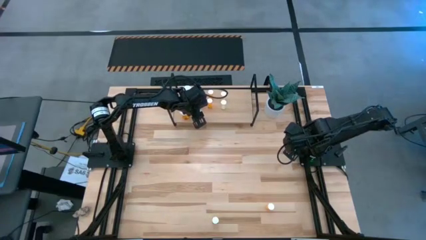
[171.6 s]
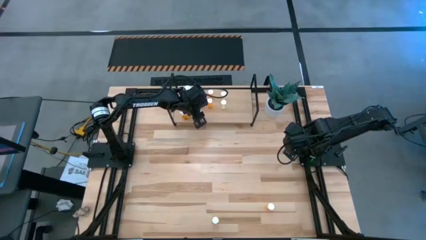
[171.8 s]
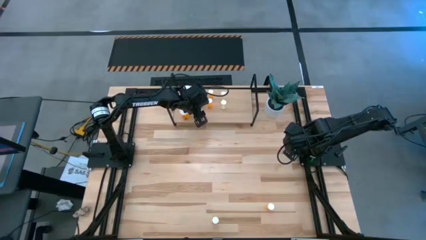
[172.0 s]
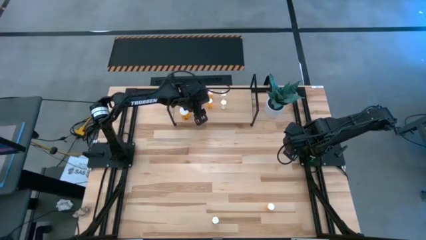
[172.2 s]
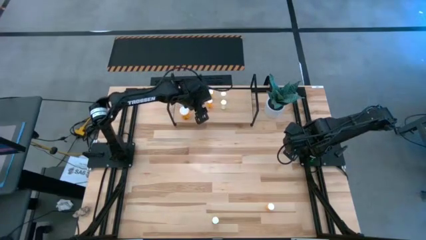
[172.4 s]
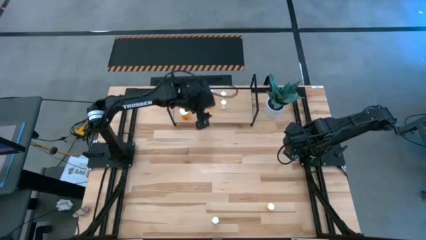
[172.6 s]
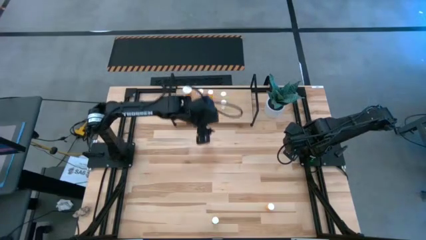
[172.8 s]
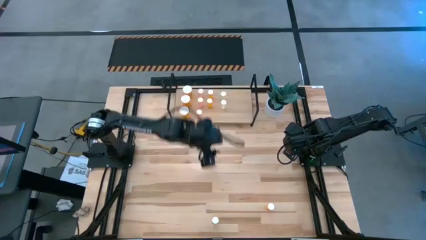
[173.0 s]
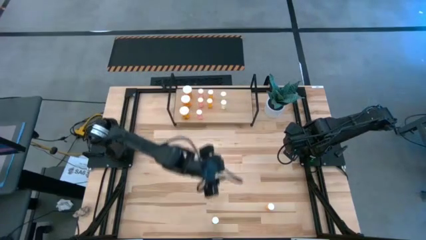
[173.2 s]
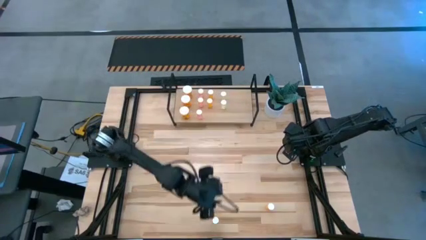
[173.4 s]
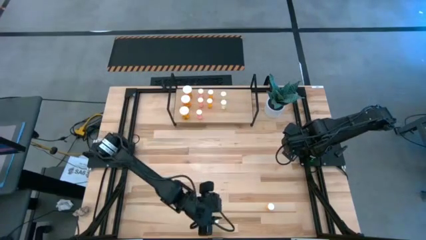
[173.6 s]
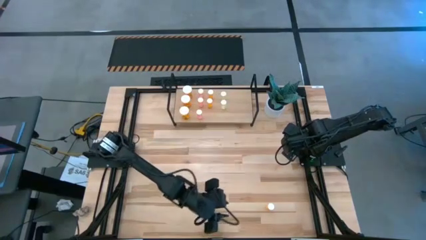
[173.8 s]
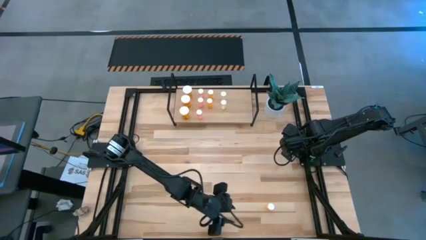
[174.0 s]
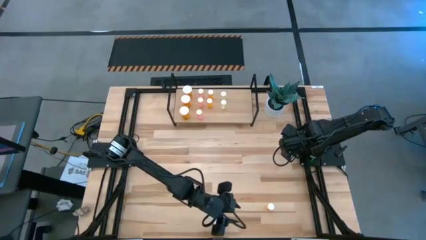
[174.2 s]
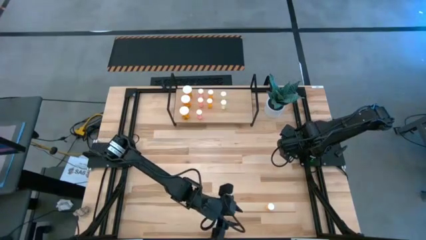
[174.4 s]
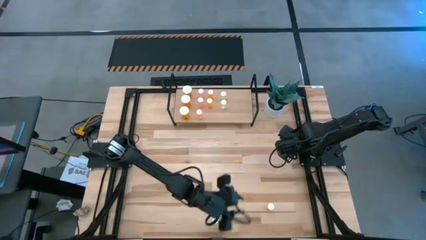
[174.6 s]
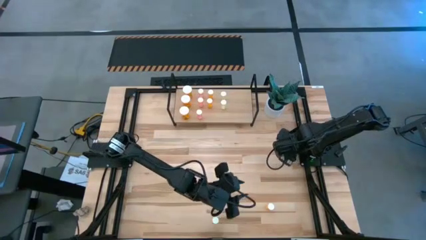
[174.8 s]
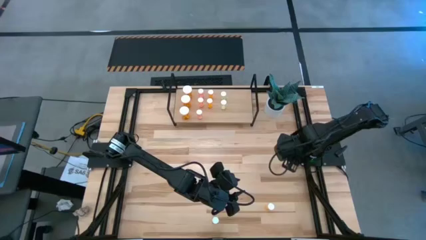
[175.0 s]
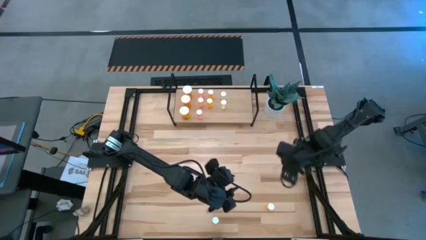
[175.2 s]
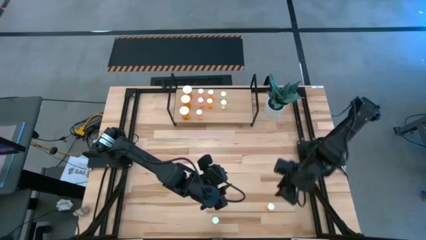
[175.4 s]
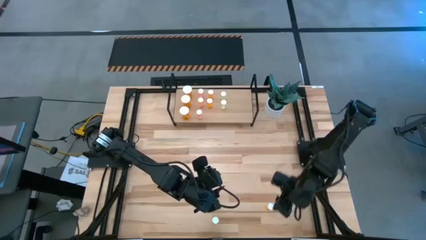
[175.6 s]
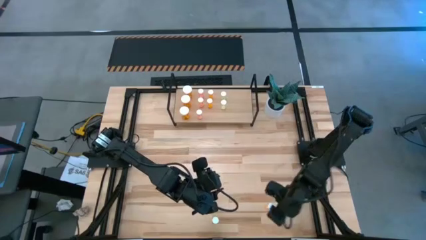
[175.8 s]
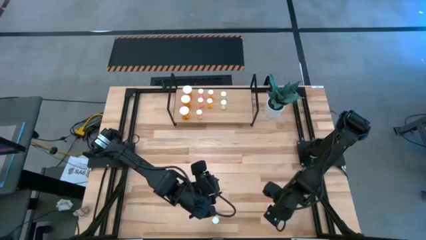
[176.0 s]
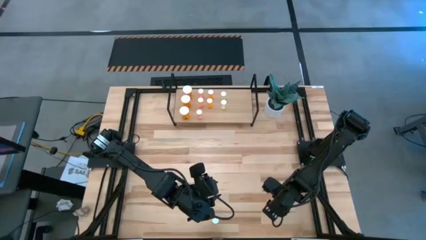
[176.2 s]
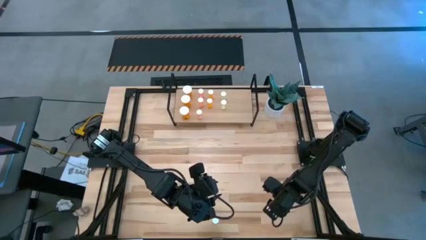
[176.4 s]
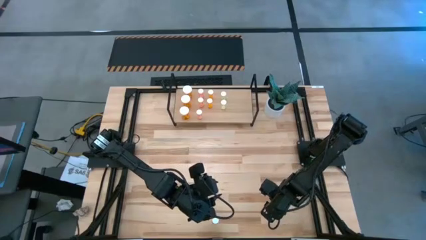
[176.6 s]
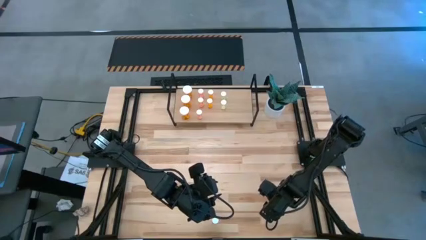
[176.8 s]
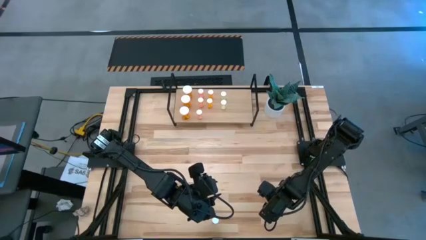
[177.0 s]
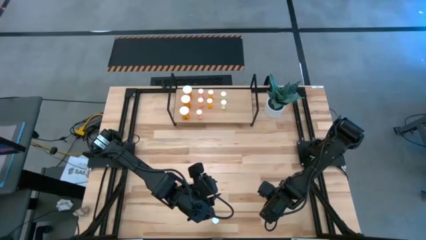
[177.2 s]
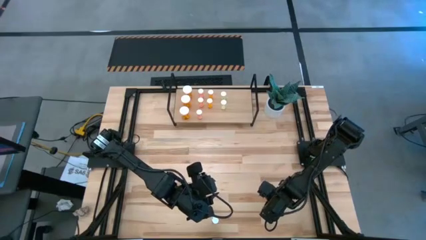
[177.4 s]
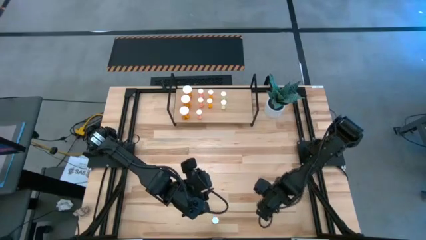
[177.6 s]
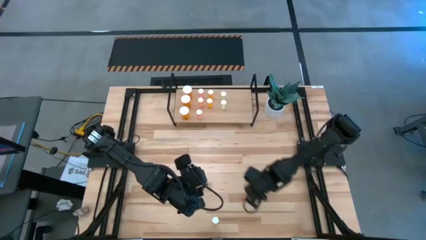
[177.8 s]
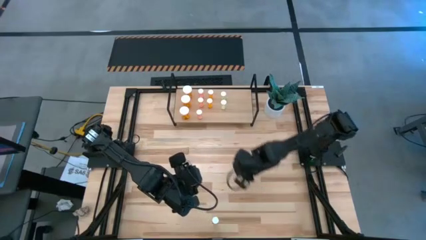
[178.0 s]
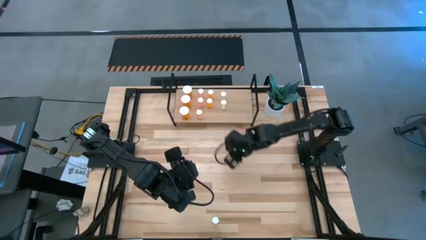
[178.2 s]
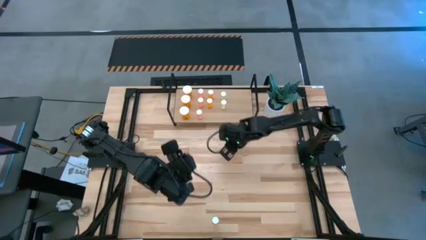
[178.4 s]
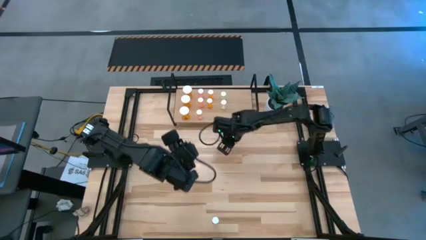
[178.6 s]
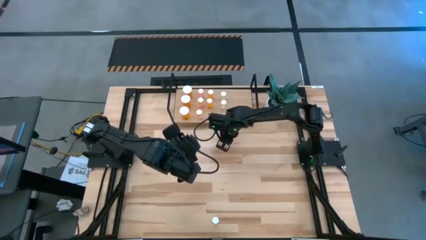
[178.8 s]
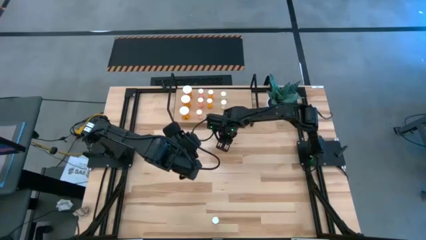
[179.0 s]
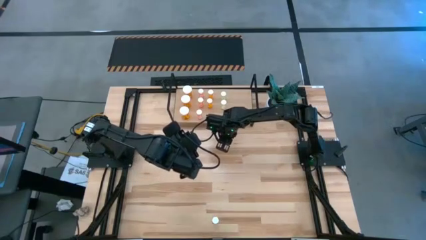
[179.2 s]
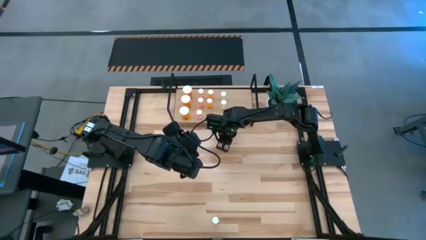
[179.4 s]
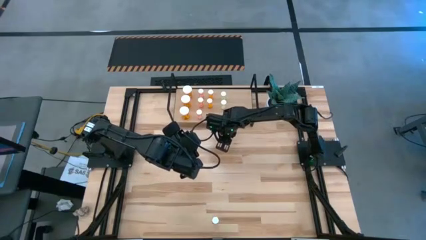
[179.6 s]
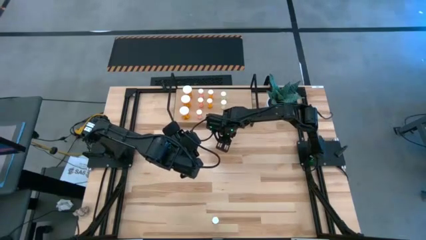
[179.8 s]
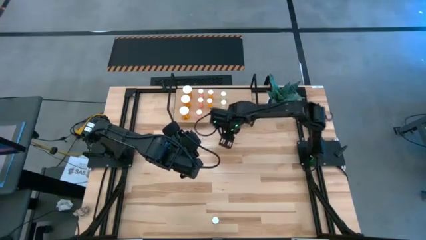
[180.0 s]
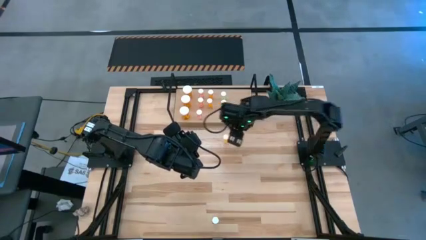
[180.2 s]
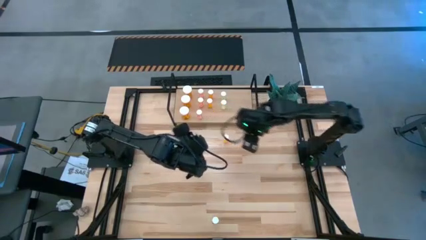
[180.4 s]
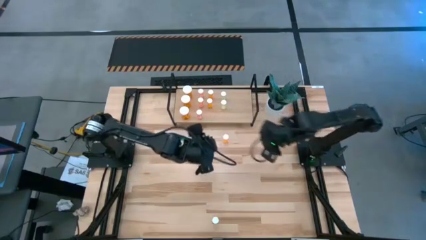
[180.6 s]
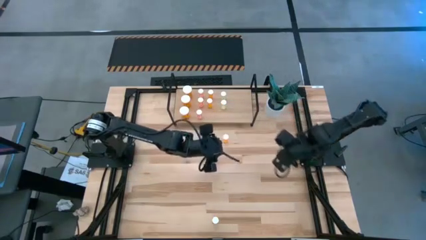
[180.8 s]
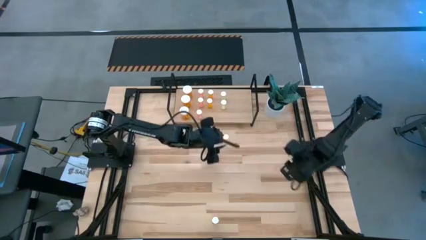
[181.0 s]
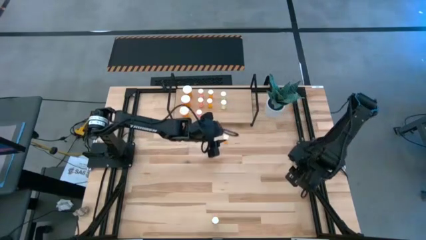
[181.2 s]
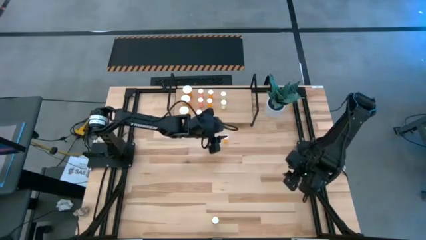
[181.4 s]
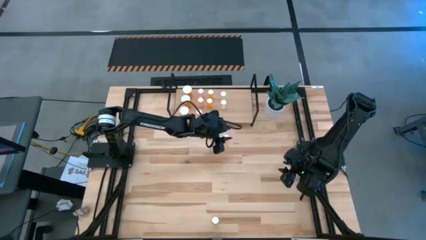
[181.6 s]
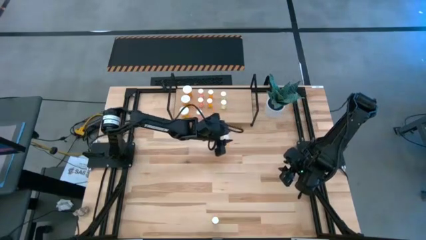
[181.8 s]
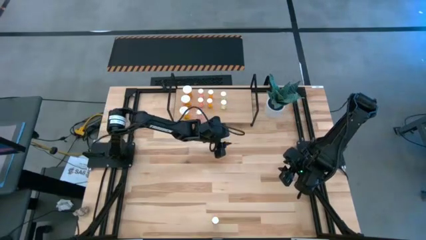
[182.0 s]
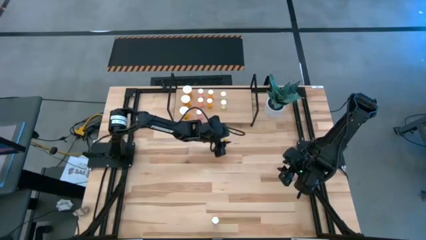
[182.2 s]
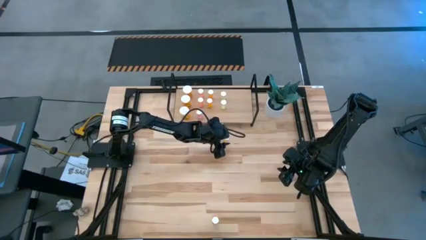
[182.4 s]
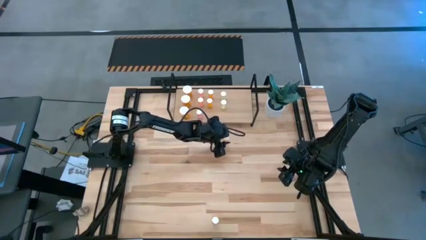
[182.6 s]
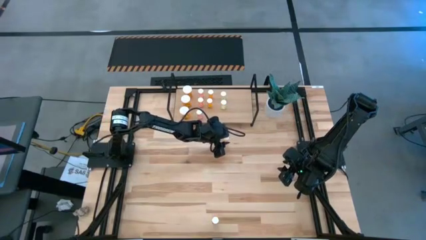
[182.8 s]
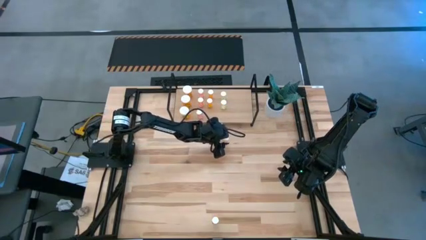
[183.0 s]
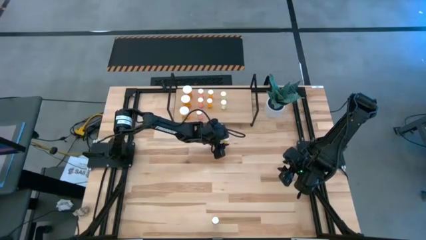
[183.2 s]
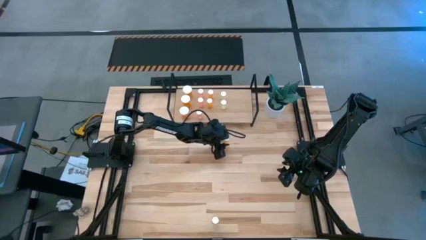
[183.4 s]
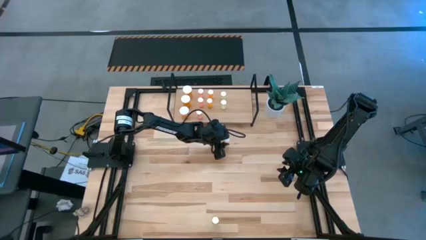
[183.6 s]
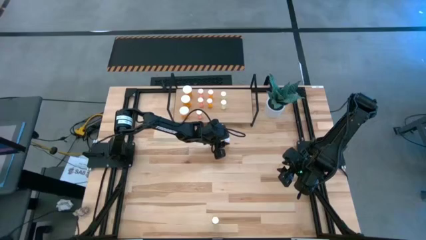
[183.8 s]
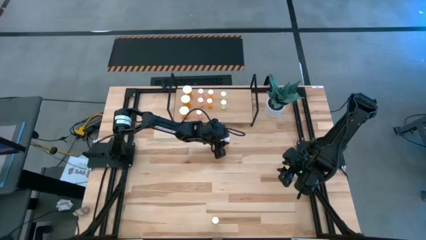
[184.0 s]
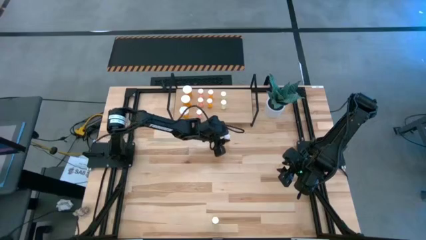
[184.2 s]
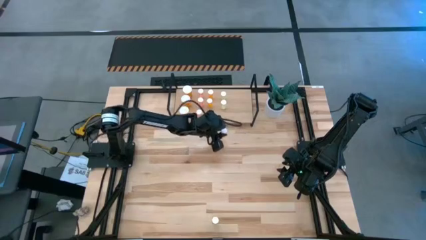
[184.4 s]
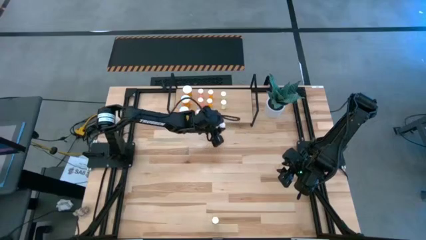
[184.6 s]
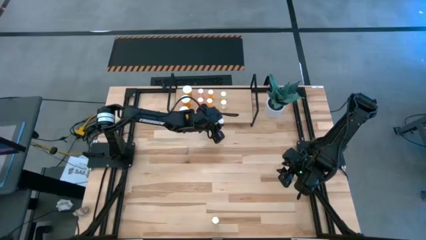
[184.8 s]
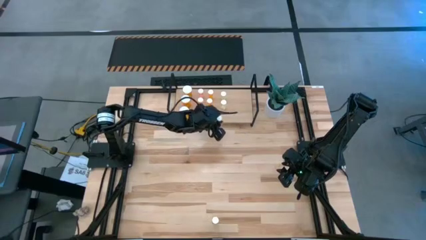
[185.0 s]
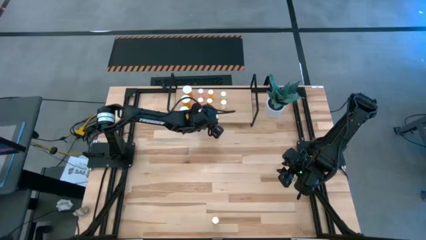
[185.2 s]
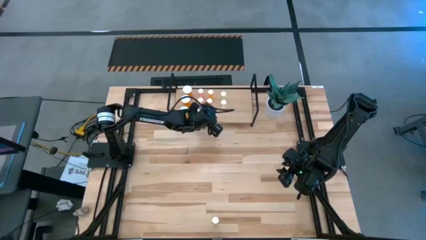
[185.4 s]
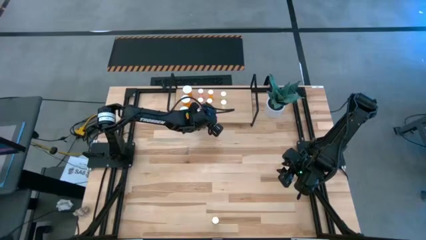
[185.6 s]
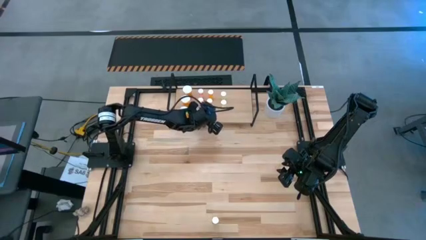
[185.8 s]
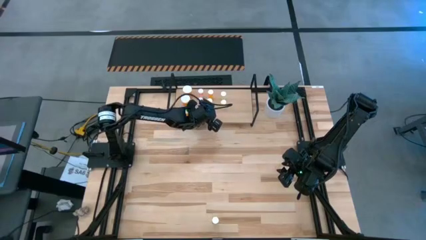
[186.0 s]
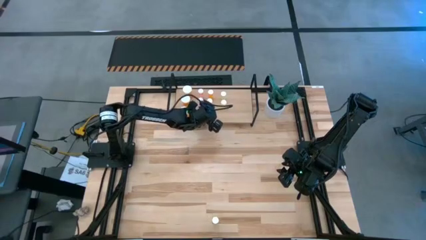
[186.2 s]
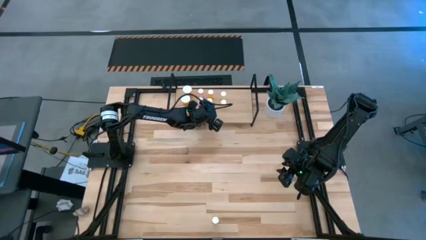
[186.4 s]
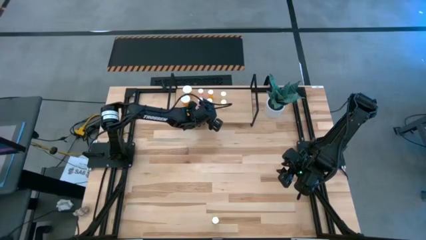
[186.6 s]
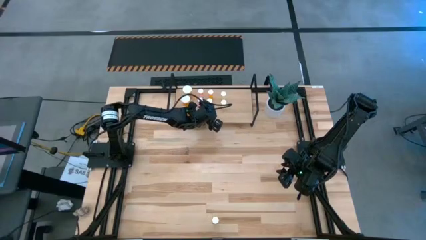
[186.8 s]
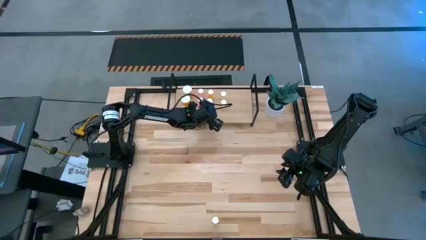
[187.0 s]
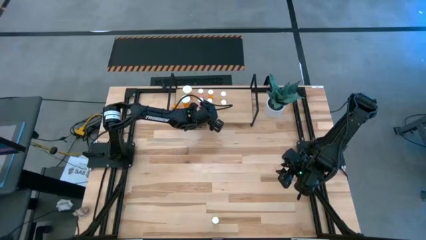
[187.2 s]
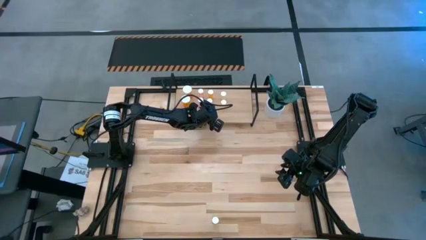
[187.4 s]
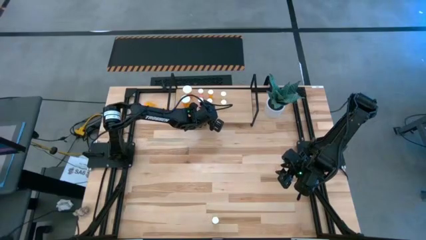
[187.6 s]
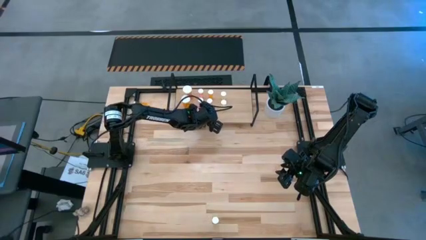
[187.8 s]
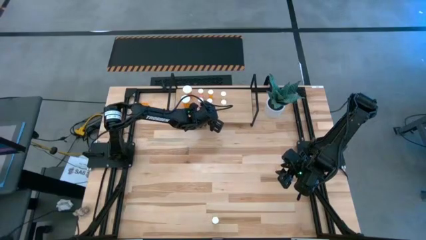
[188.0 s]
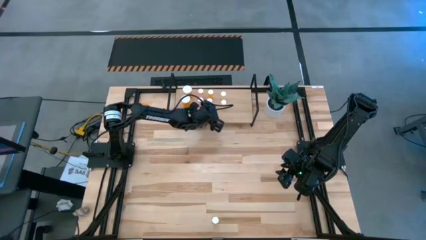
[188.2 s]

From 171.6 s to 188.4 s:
Task: Pick and place medicine bottles onto shelf by color
Put the small orange pill bottle on the shelf aligned with the other small orange pill bottles
